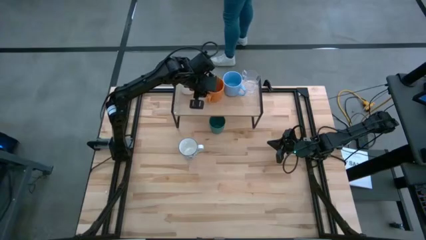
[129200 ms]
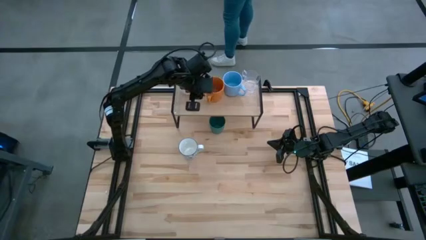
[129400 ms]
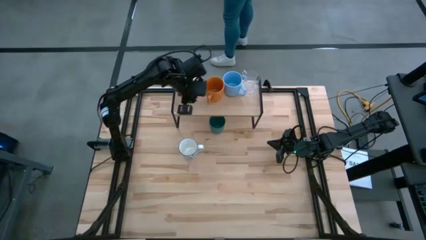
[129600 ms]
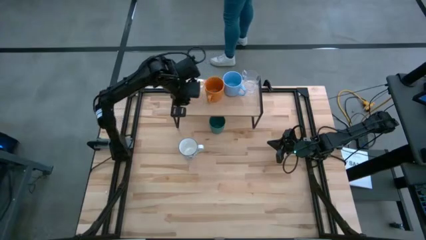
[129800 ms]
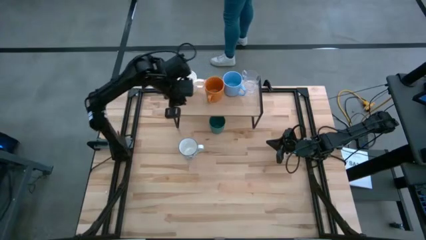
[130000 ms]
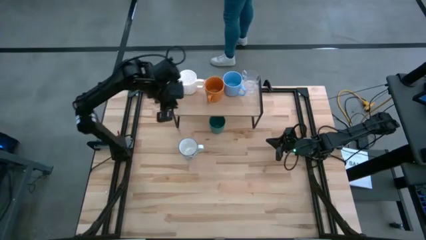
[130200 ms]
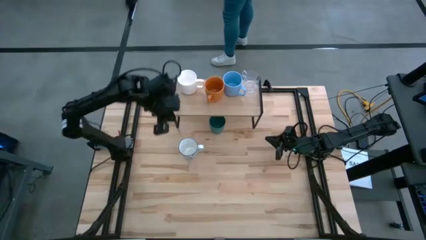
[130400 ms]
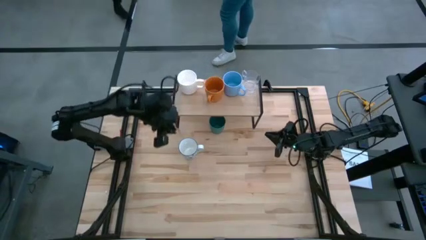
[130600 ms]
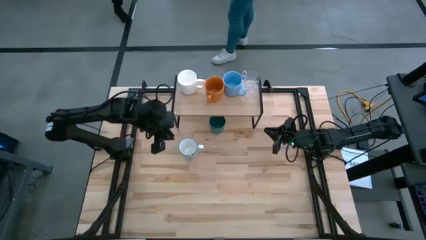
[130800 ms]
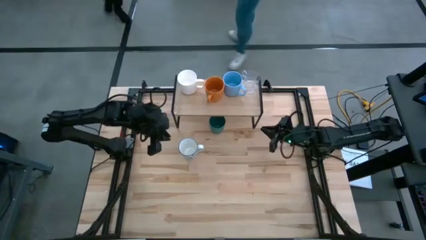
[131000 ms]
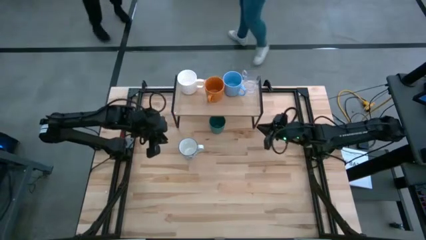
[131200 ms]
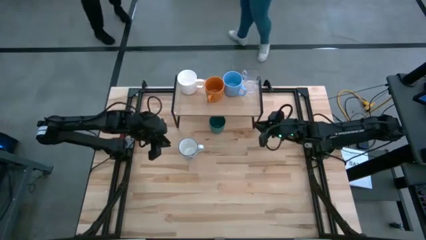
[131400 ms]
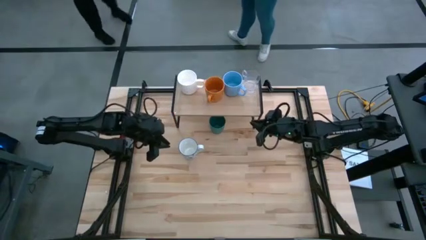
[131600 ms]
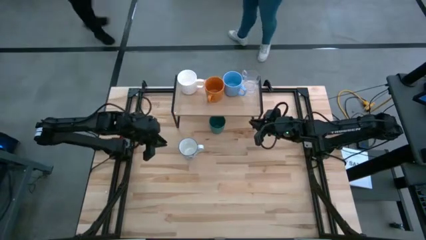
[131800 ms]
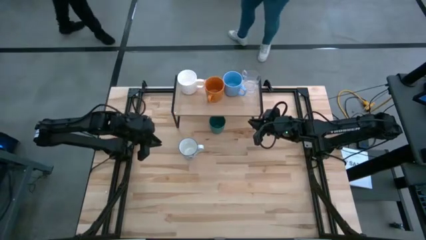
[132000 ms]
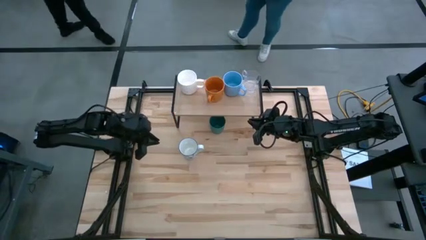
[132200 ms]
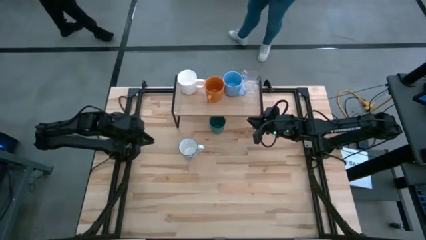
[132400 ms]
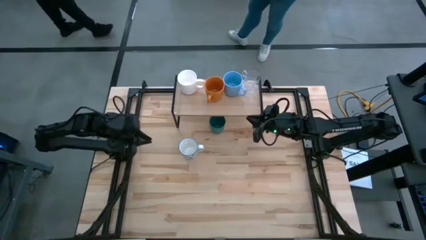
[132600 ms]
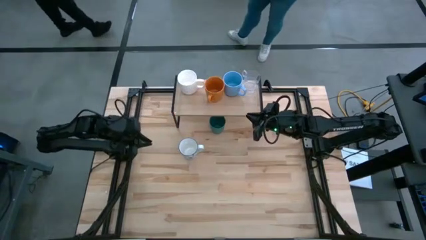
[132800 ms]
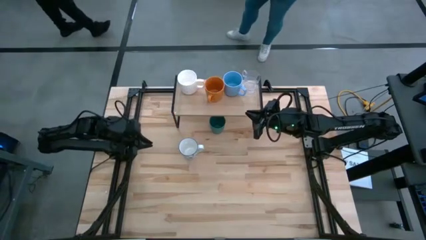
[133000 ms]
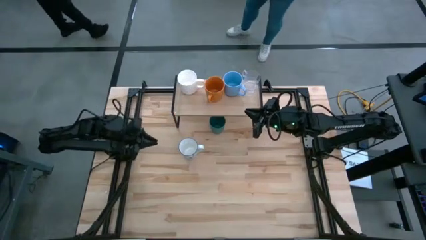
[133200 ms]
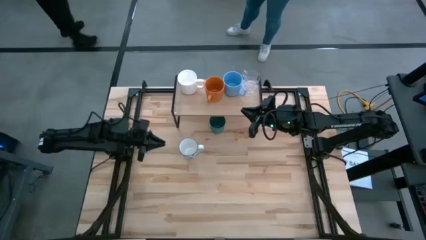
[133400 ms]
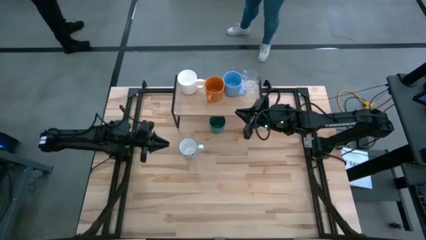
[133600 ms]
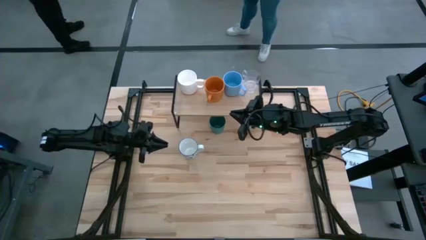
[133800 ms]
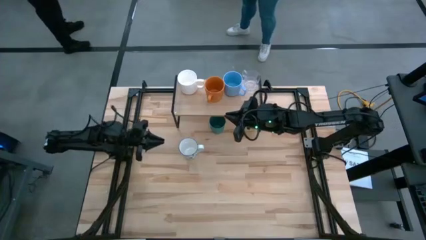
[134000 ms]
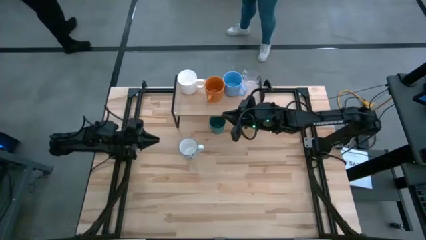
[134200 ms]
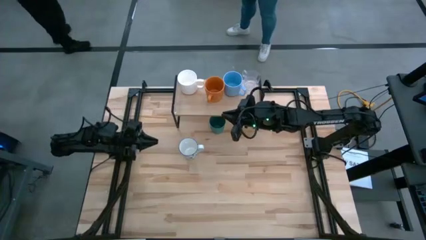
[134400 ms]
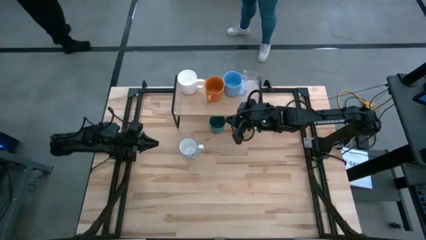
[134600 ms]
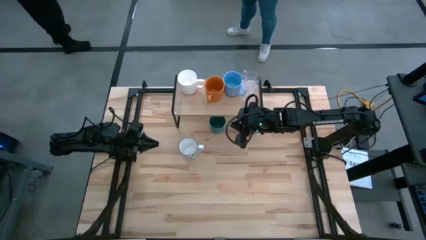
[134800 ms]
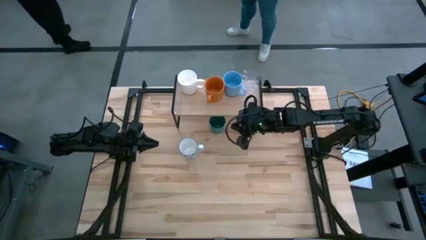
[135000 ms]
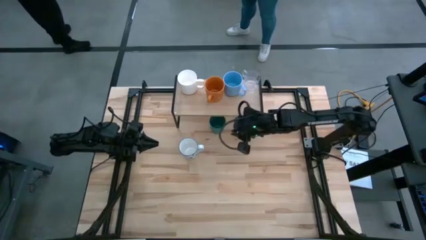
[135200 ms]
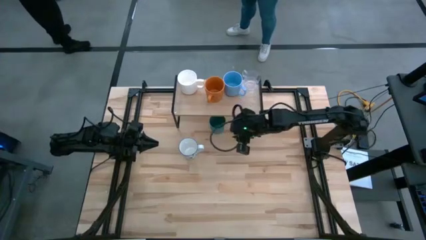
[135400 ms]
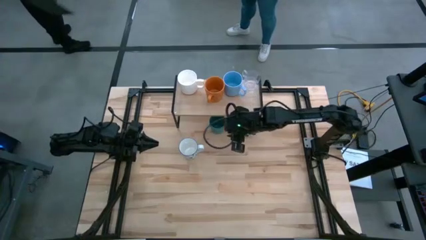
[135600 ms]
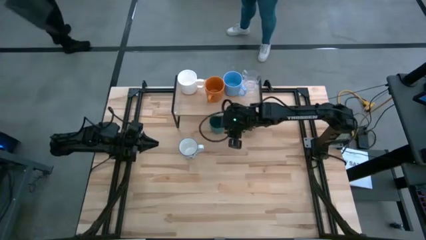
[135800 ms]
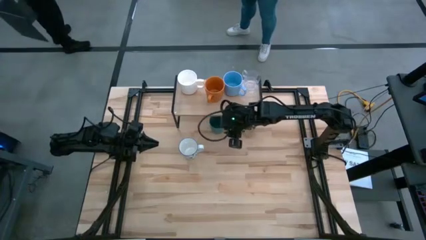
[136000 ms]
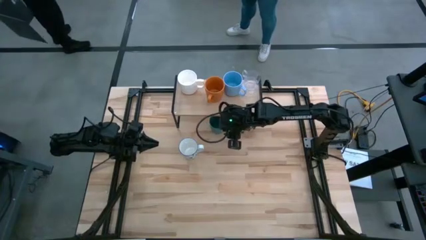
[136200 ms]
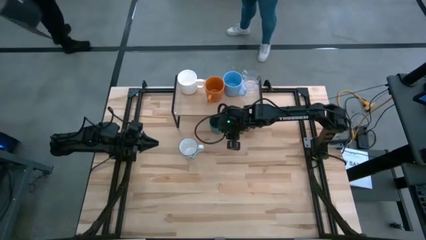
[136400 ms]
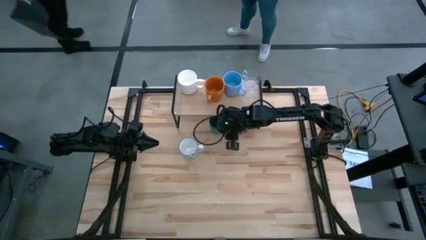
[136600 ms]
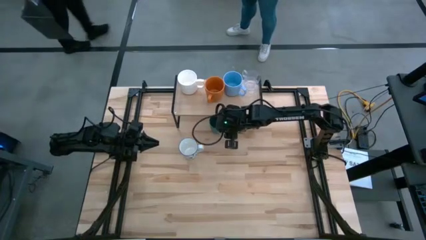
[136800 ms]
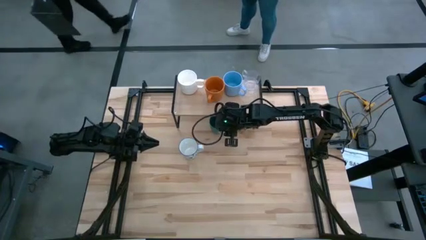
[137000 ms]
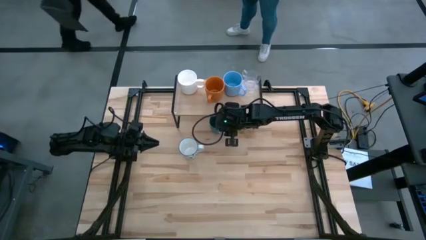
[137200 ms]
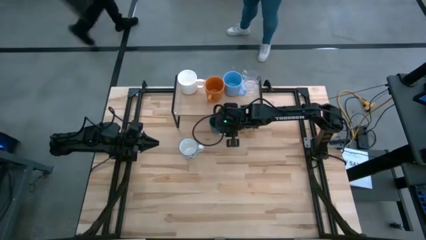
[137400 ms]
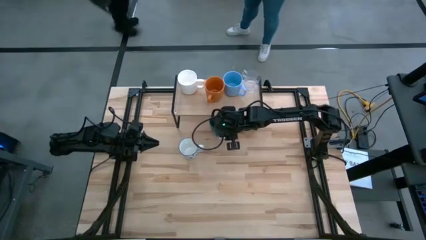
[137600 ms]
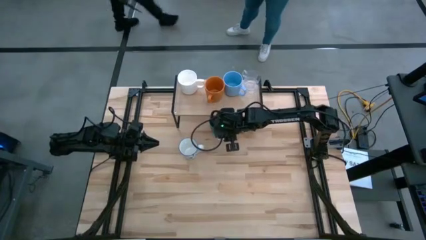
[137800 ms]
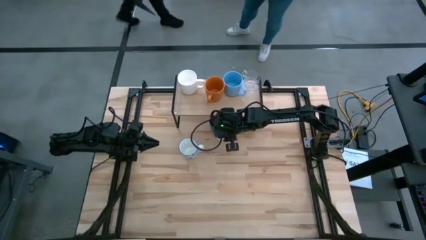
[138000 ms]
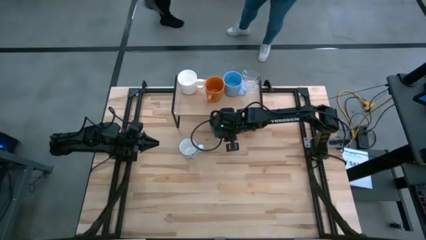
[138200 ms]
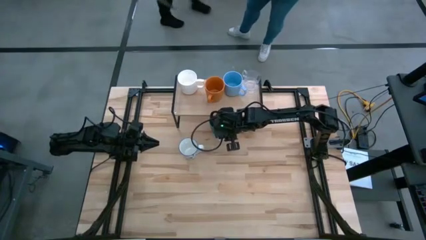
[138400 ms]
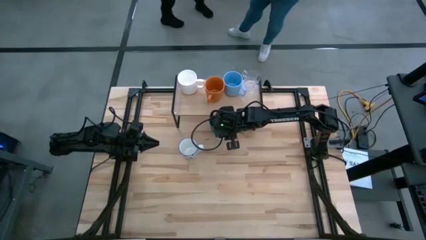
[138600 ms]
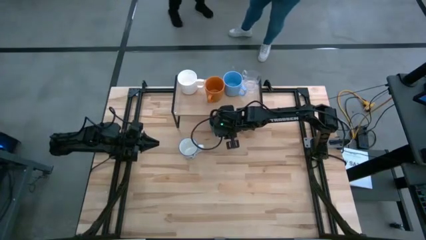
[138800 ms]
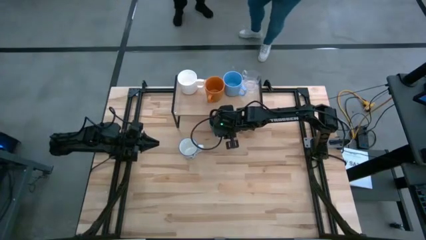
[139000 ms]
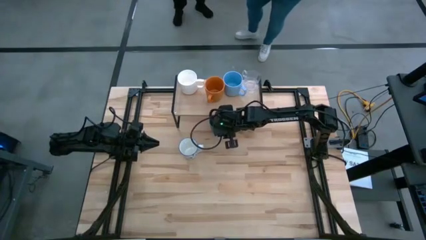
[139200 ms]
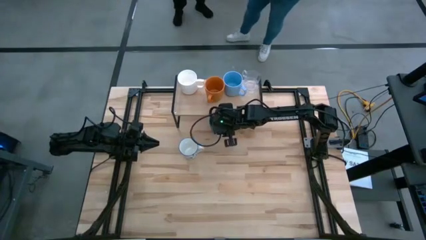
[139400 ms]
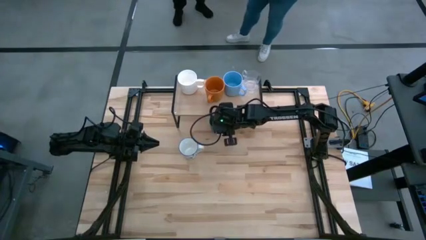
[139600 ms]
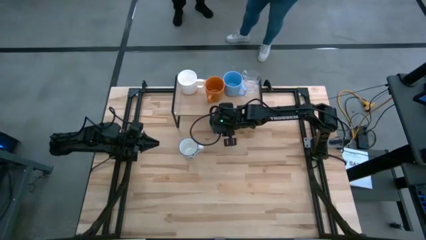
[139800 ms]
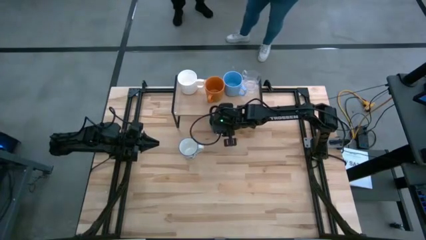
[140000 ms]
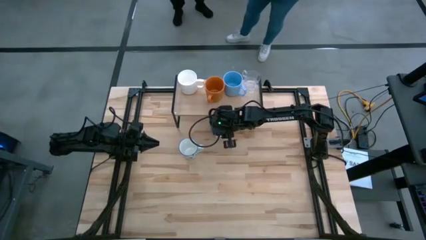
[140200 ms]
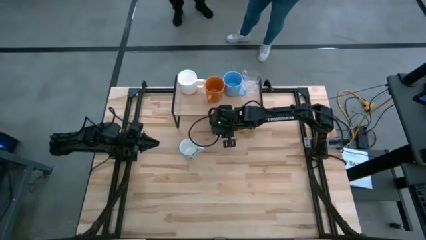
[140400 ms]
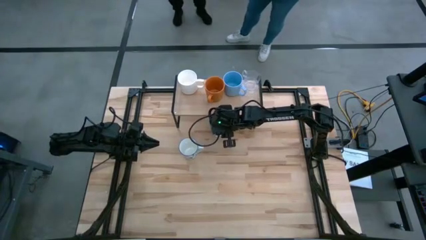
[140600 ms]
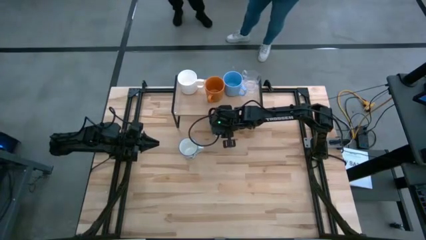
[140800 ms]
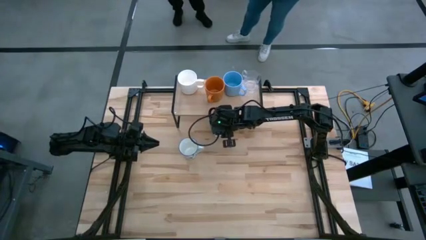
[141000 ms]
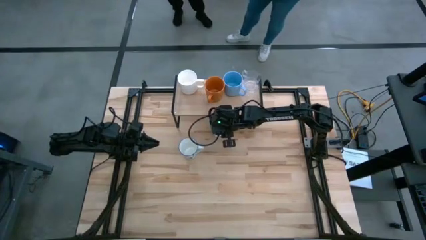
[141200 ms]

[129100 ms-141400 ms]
Task: Stack small to large cups/mugs on shelf
Put the green cup on the shelf

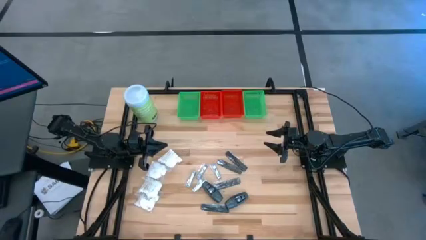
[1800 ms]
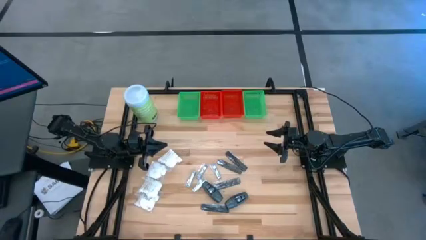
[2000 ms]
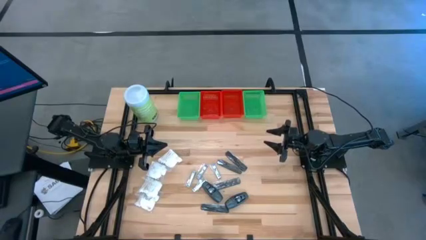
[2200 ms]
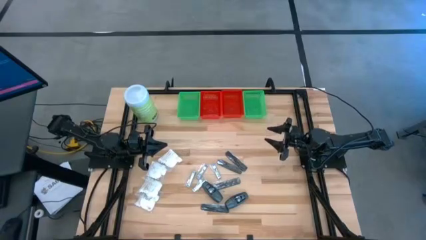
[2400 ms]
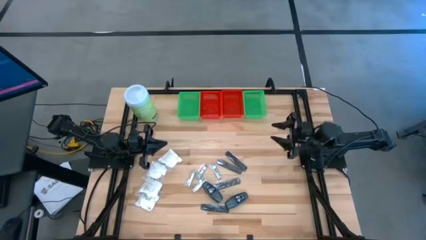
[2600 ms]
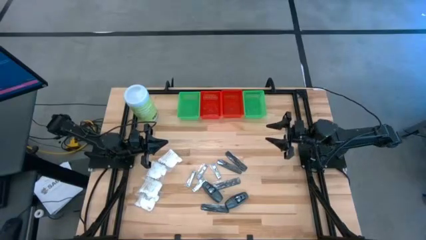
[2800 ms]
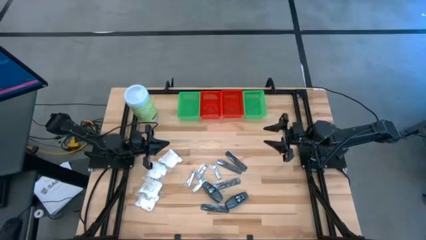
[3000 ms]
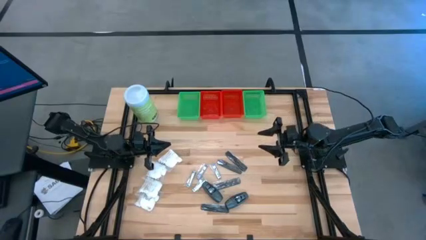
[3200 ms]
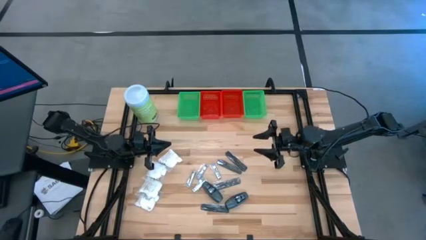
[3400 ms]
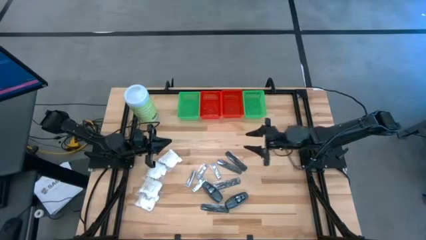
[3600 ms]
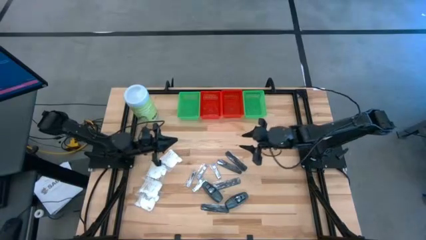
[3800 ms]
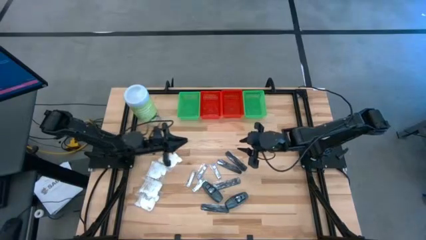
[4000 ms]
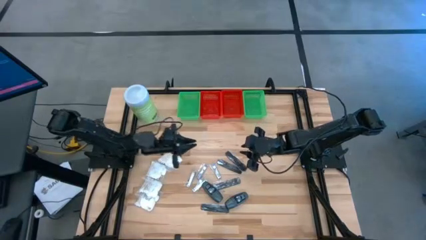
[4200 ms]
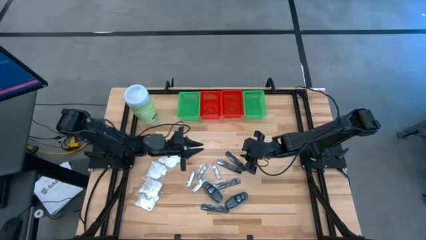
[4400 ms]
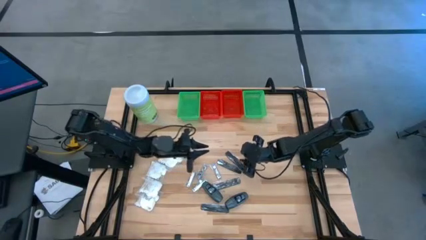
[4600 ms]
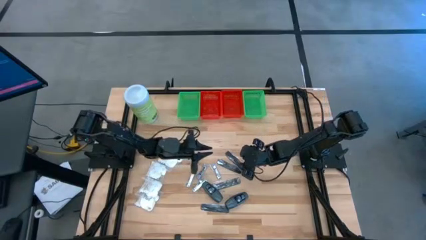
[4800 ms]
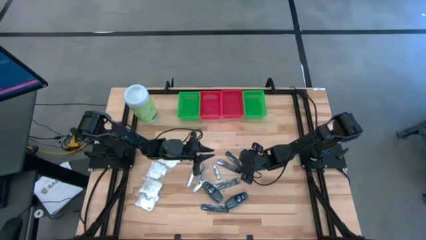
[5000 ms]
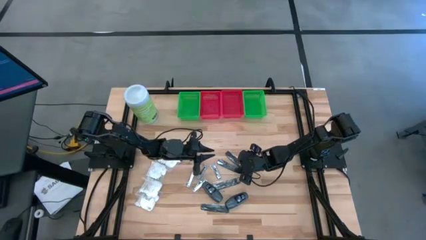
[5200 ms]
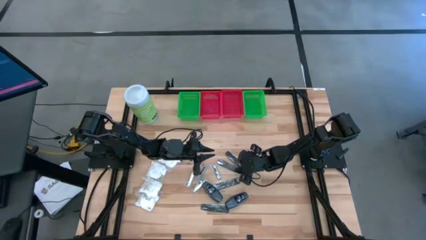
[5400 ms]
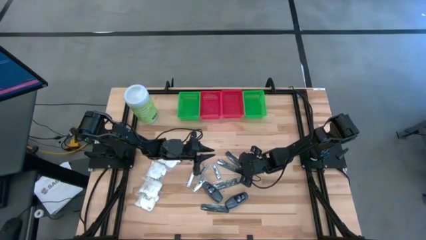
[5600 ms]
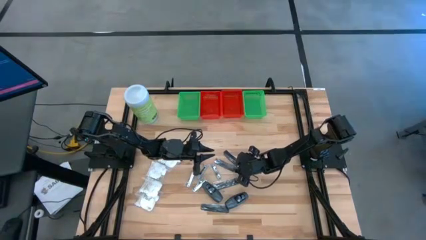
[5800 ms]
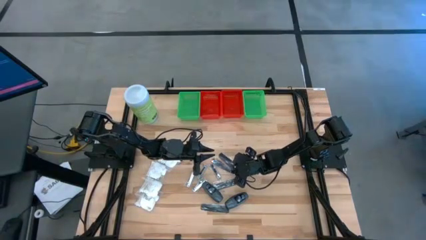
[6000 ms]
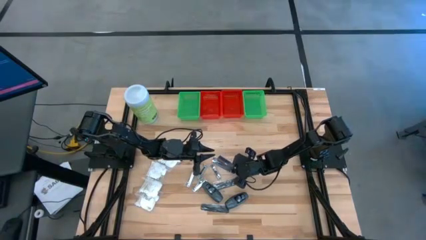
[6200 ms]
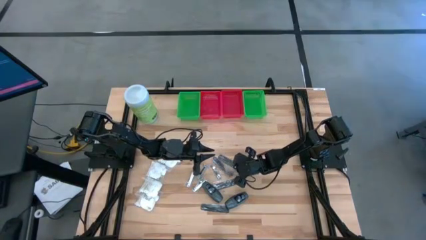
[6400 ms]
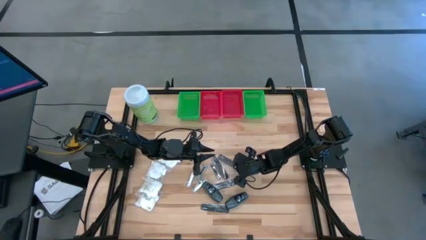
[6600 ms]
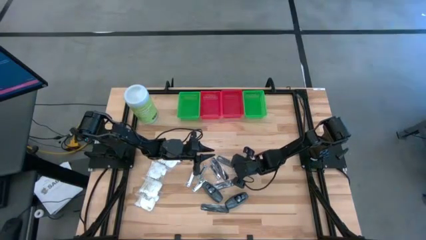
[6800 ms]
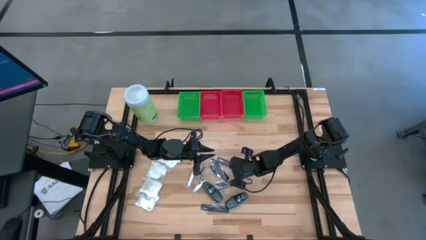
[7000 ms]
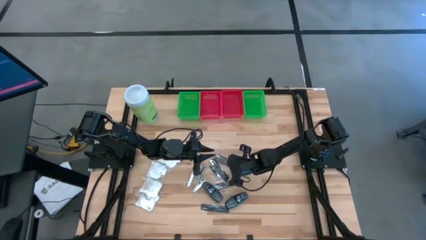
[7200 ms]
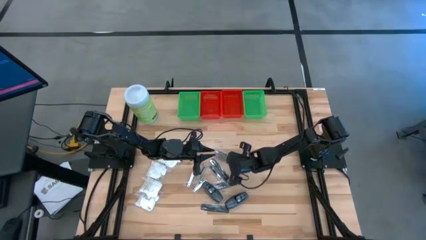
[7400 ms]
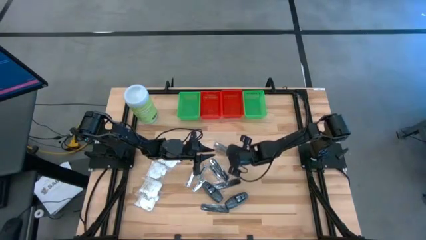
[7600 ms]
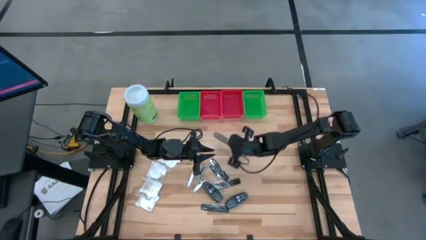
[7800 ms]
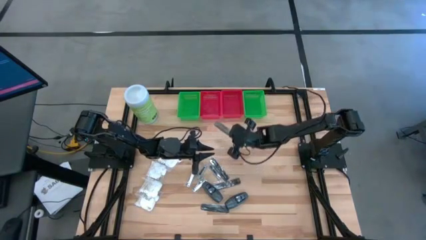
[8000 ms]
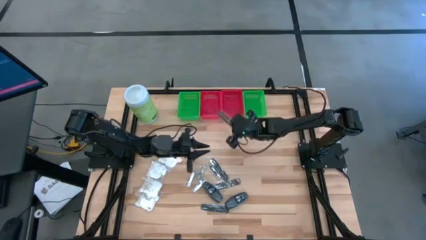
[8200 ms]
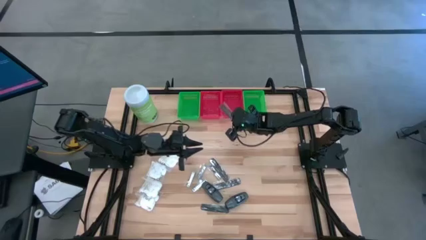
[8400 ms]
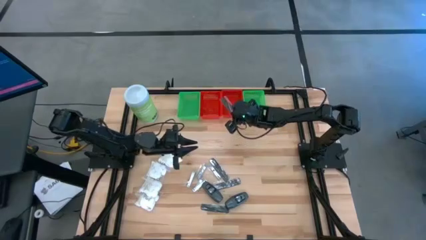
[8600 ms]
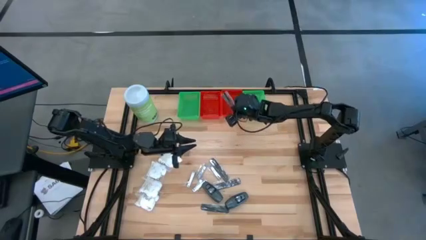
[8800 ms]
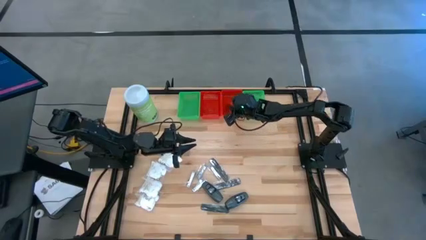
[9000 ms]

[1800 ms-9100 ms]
Task: Pick & Place Travel size toiletries
Put the black comb into the right red bin
